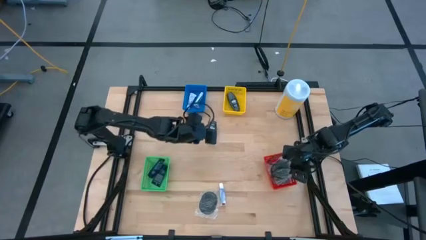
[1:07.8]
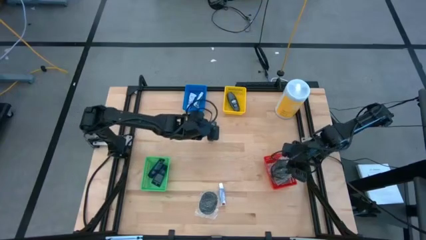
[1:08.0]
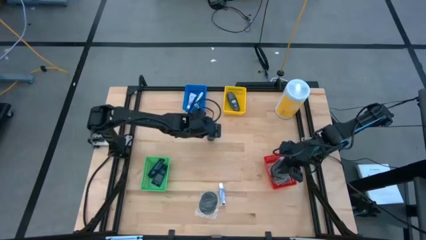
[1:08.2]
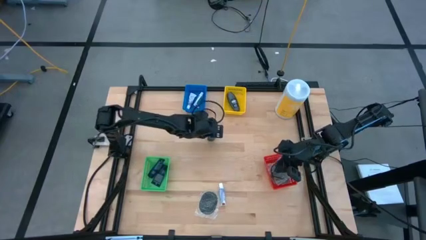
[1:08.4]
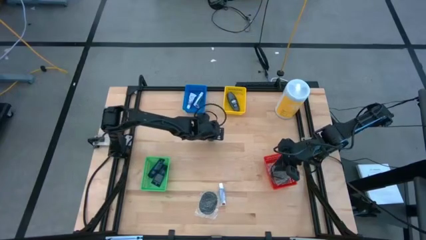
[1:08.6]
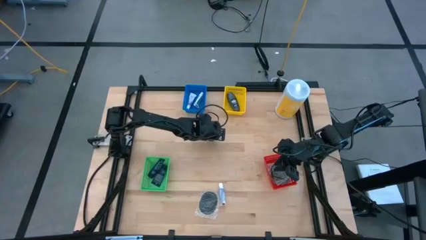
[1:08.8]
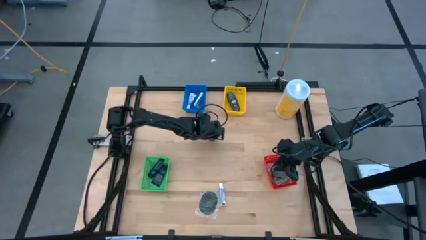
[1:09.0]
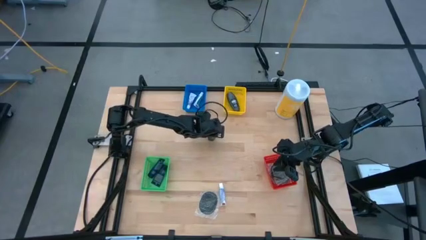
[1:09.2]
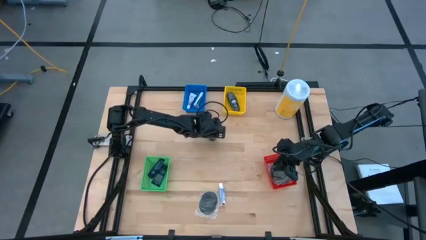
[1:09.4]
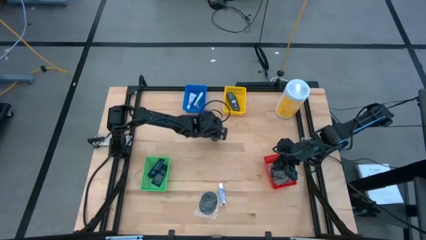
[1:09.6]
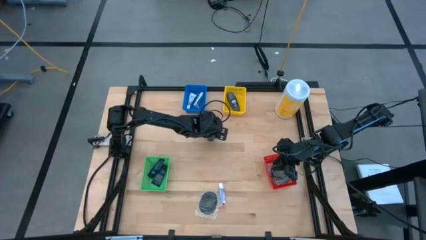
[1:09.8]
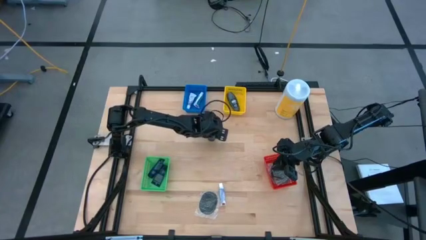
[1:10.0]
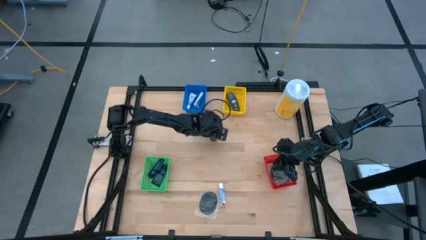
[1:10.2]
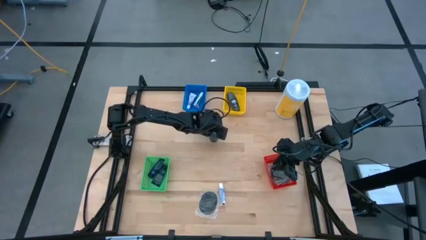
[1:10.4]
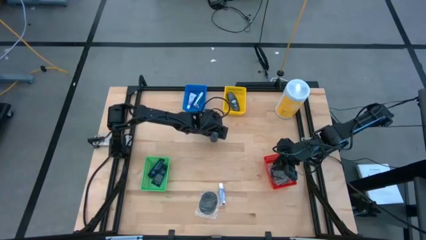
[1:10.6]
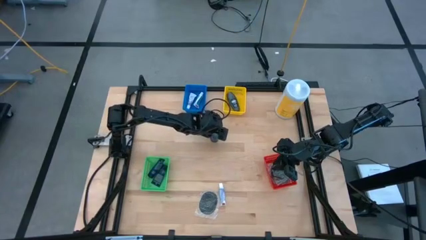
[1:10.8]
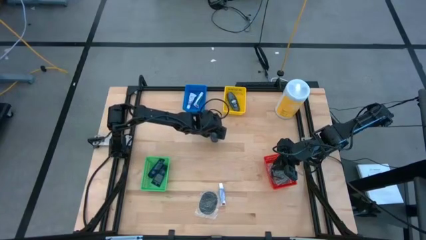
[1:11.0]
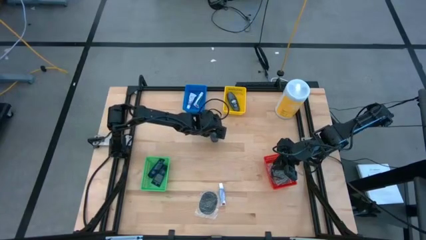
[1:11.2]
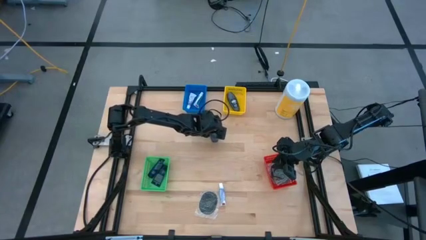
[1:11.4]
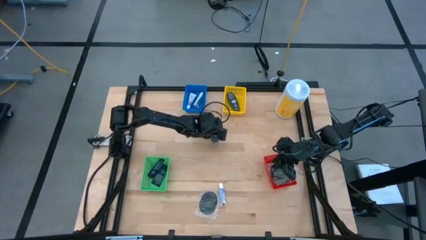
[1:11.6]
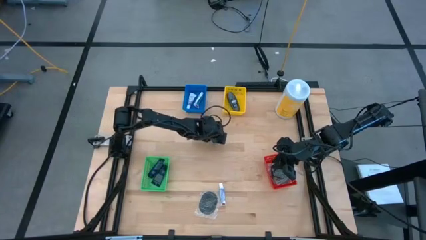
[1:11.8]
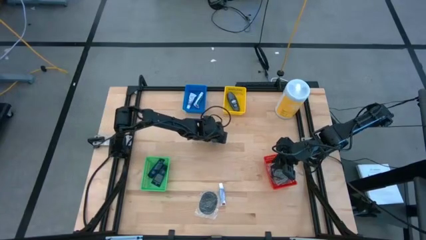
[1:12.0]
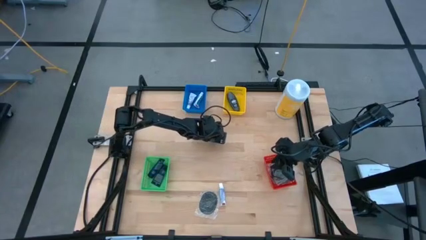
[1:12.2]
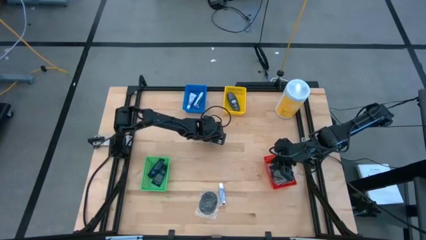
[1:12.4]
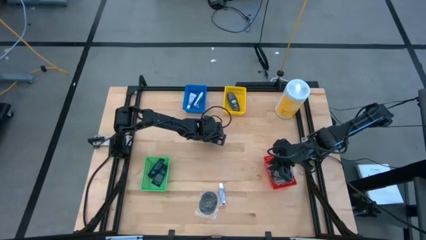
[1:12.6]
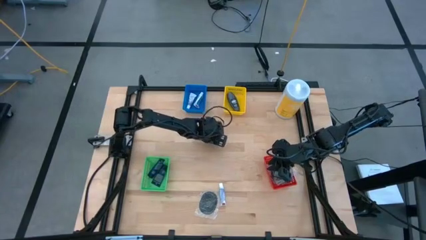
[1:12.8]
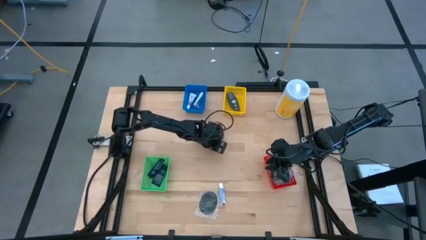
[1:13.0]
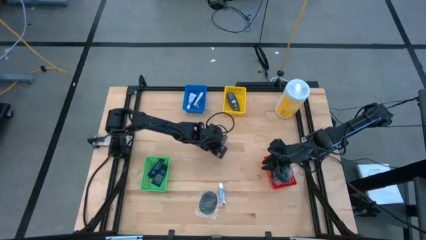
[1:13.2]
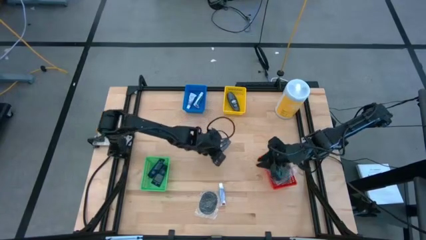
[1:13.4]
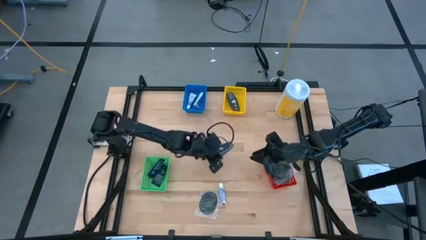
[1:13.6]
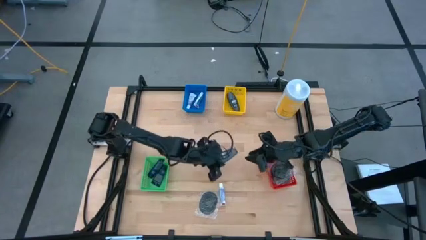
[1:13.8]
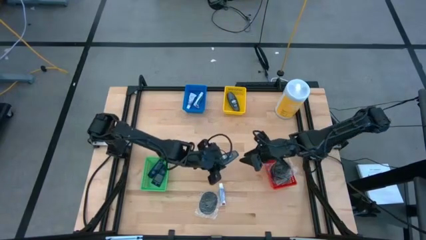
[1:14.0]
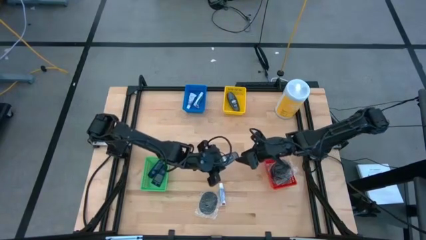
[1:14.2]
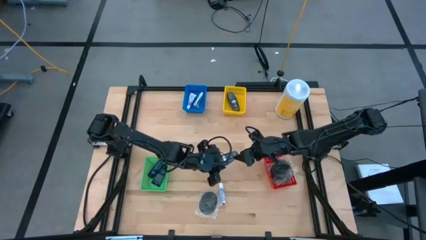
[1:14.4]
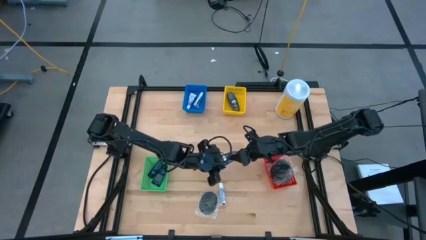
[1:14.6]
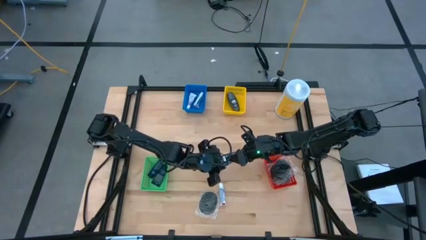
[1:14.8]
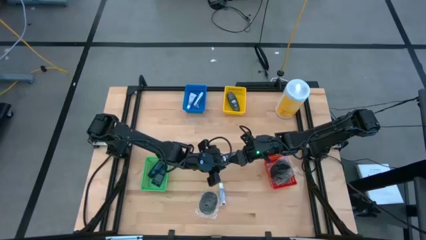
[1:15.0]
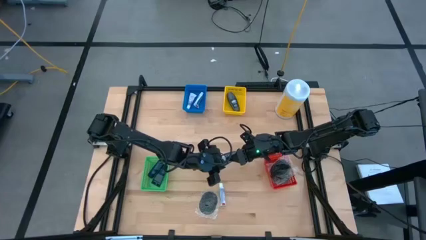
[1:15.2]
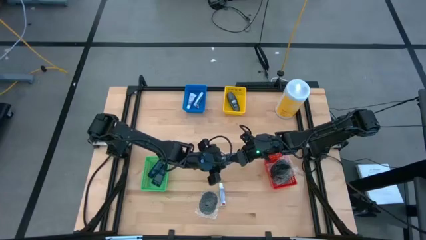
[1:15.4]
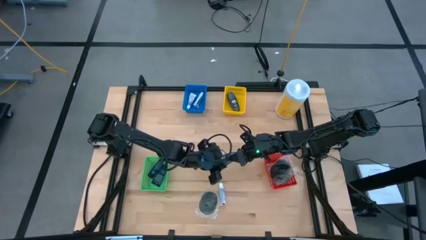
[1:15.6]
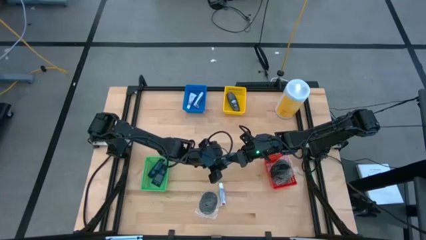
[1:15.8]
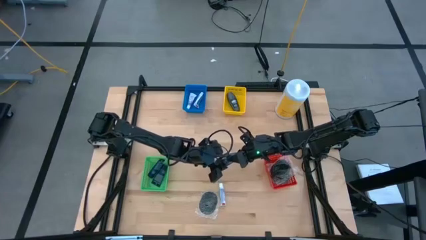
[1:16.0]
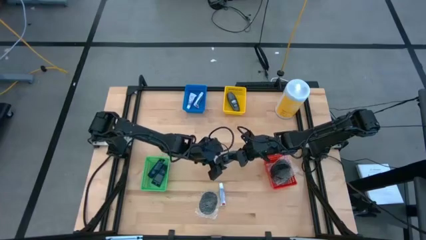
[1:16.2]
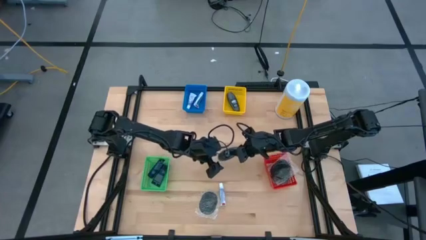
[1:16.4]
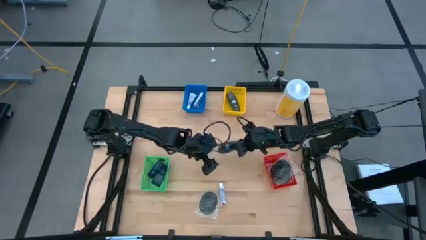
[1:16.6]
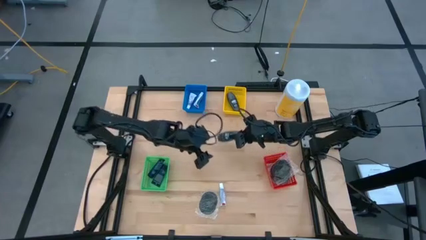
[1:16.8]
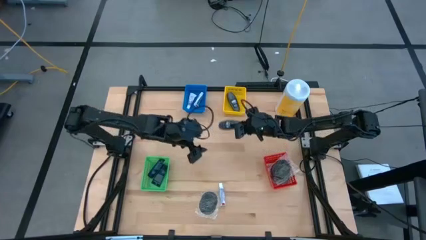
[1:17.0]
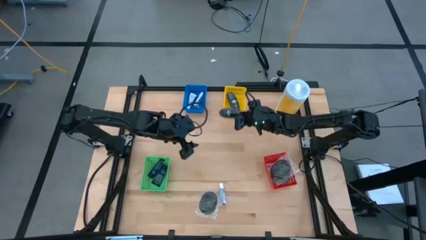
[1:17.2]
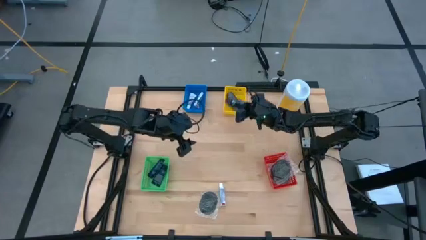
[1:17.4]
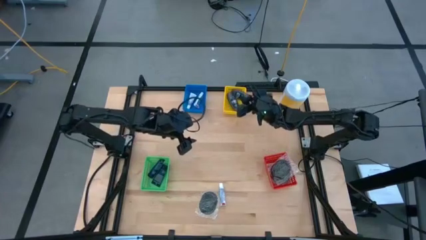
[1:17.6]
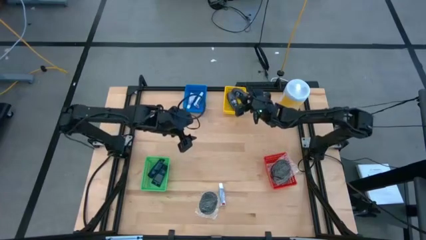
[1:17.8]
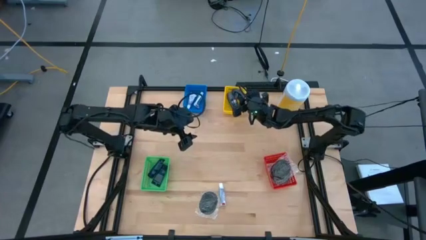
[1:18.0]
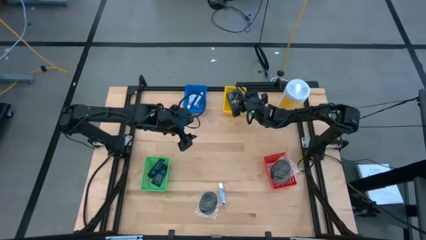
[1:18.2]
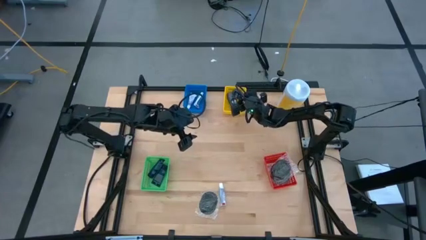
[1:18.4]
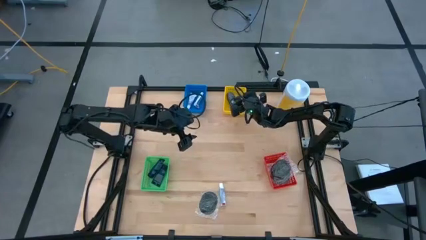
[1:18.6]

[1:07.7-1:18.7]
Task: Pick & Place Travel size toiletries
Put the gray deodorant into the yellow basket

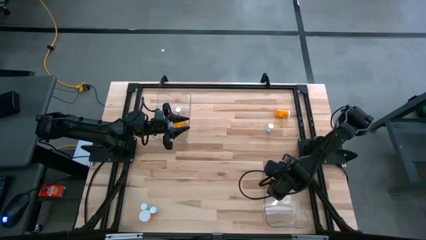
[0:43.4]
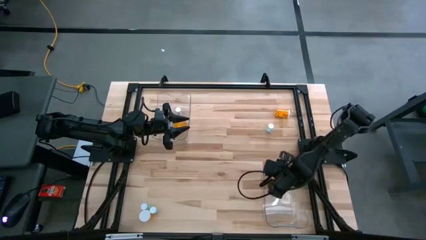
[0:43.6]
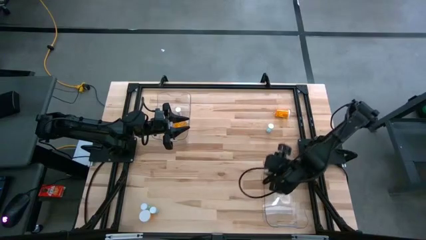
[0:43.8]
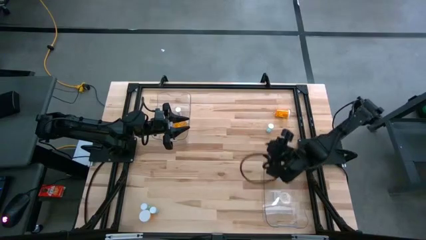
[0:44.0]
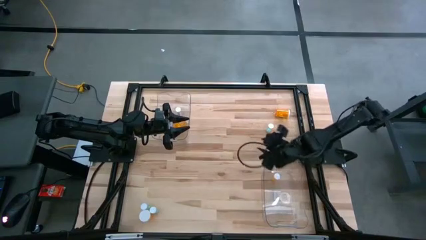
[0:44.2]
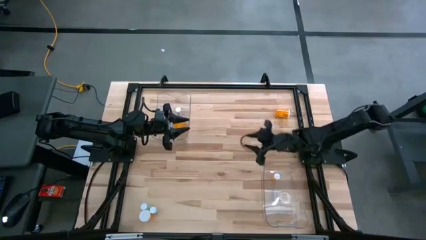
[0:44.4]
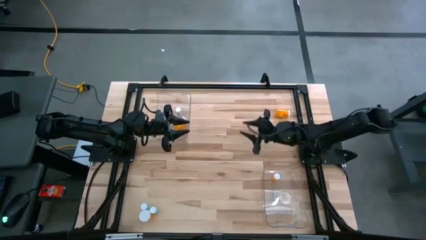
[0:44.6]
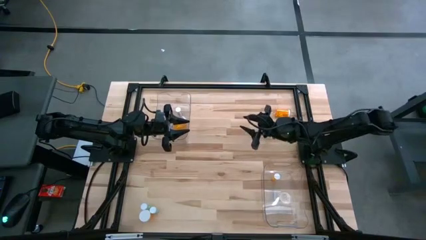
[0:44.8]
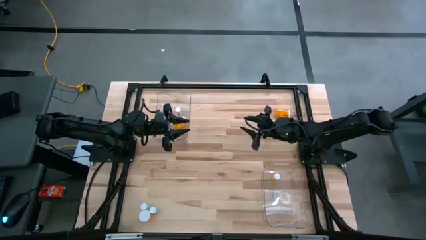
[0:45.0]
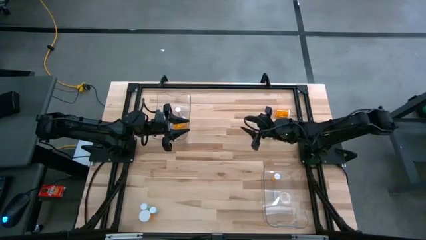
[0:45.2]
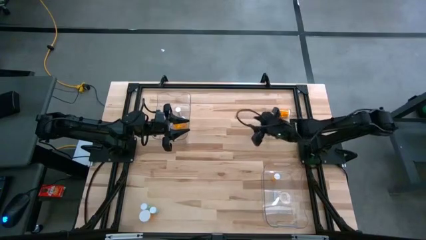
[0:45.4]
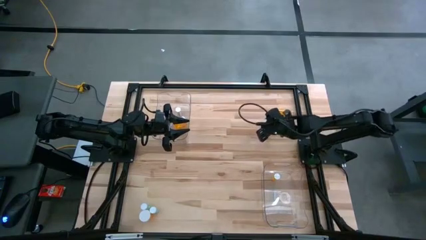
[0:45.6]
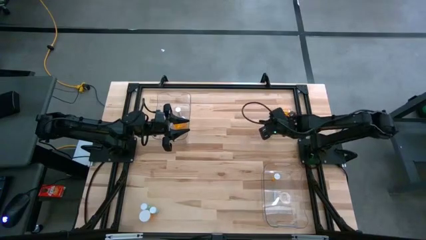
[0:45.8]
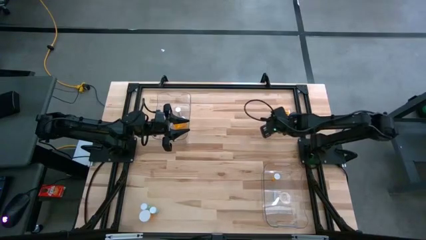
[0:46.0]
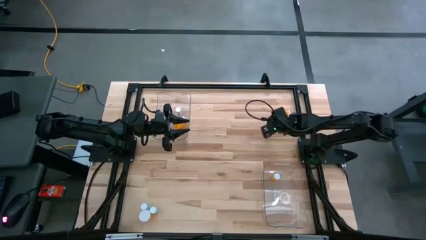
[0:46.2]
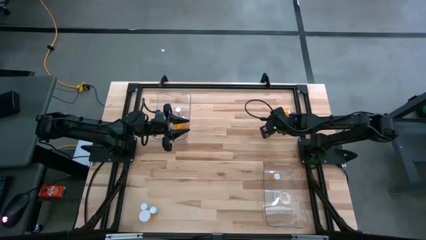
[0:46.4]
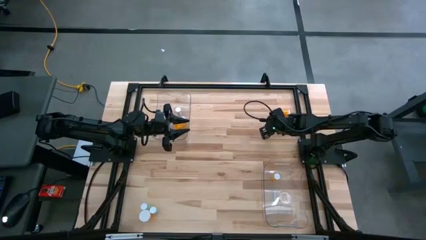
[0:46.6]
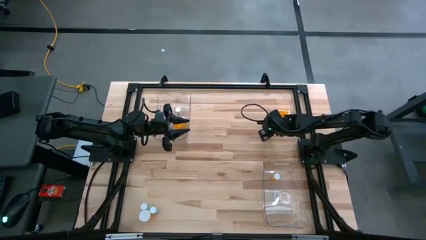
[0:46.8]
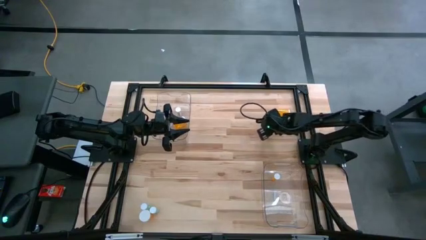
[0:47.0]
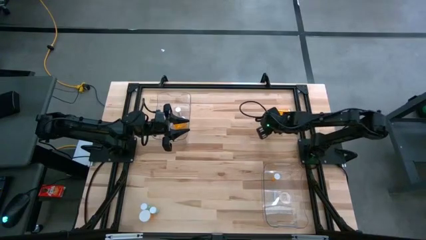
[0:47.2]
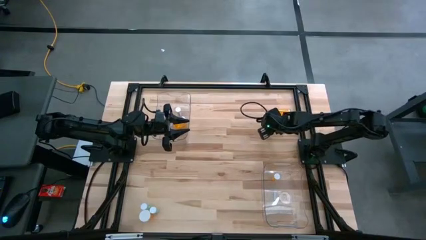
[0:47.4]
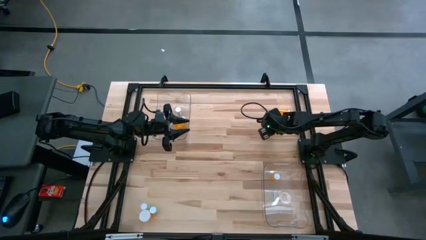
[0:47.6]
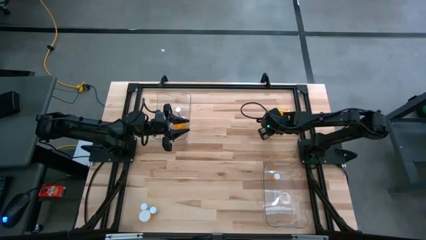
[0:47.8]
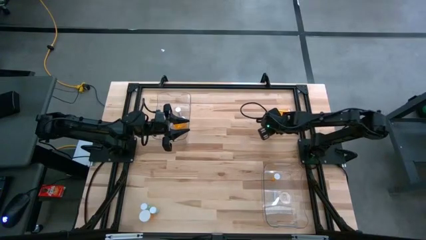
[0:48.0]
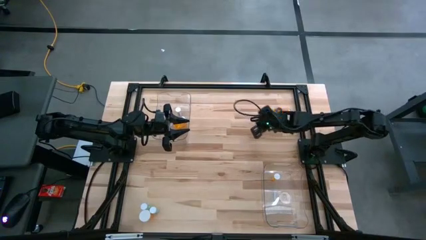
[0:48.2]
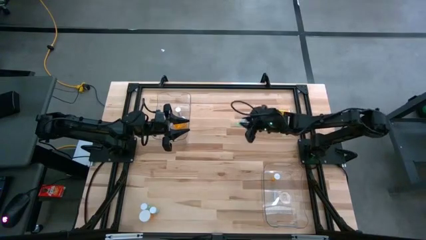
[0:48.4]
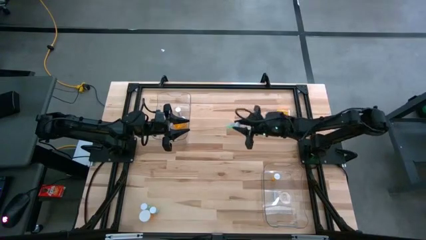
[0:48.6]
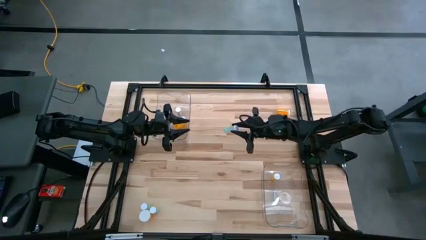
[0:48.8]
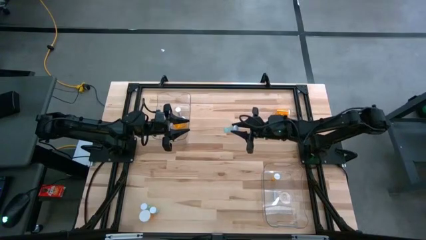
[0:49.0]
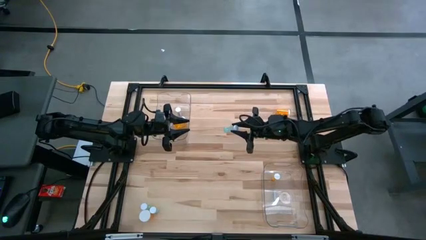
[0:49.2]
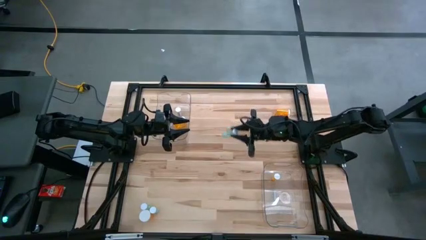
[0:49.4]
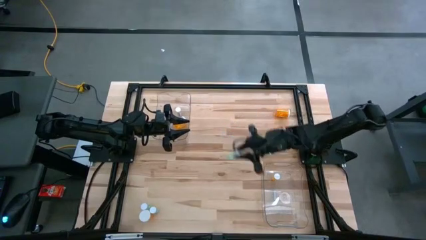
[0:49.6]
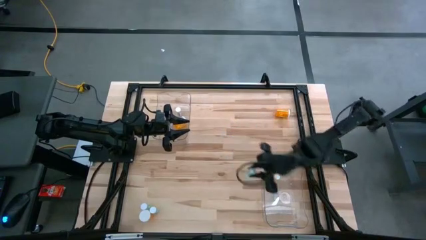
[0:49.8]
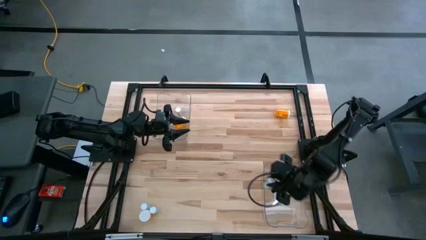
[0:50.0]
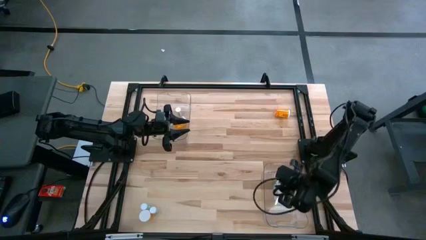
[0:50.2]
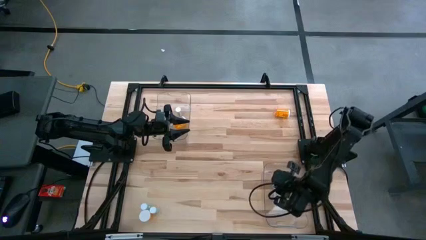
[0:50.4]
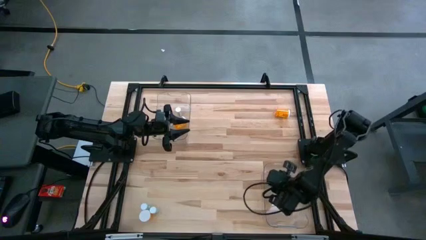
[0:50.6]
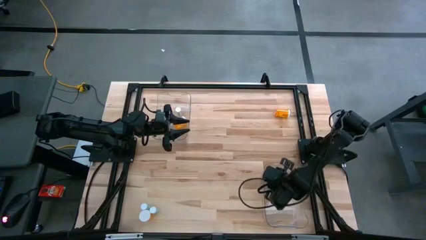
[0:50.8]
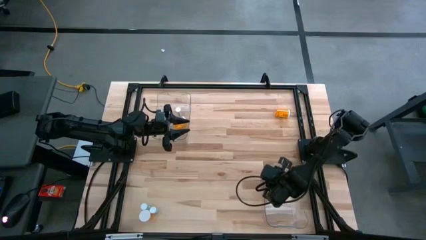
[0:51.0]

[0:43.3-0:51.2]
Task: Pick and place medicine bottles into bin by pill shape (circle, oval)
Put the blue tablet bottle into the right transparent bin
